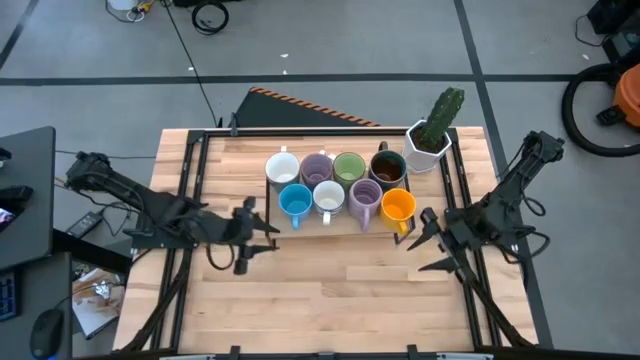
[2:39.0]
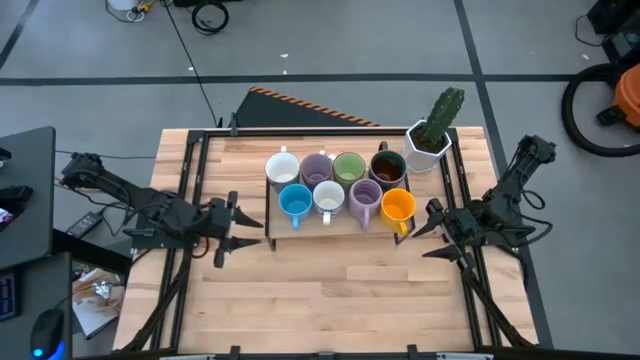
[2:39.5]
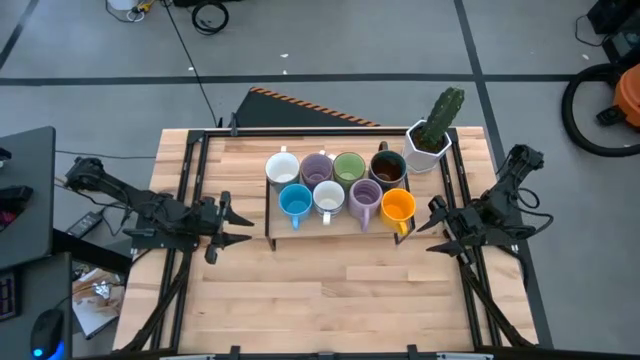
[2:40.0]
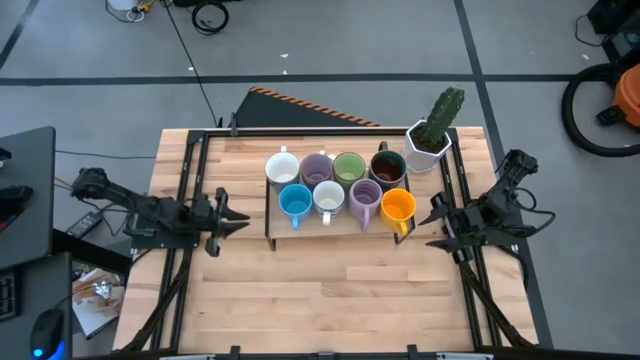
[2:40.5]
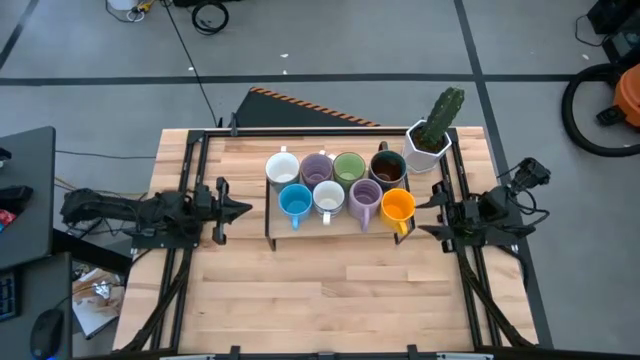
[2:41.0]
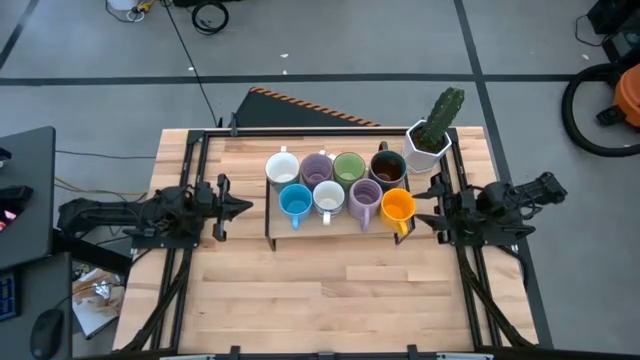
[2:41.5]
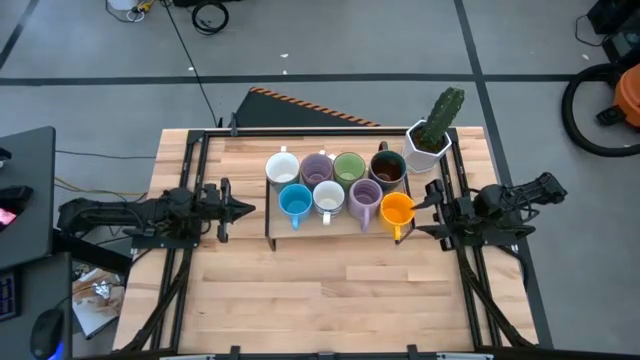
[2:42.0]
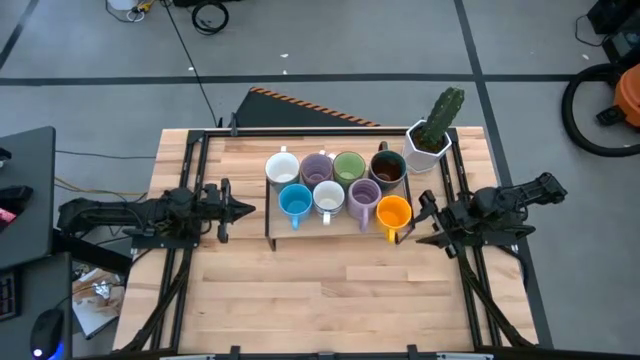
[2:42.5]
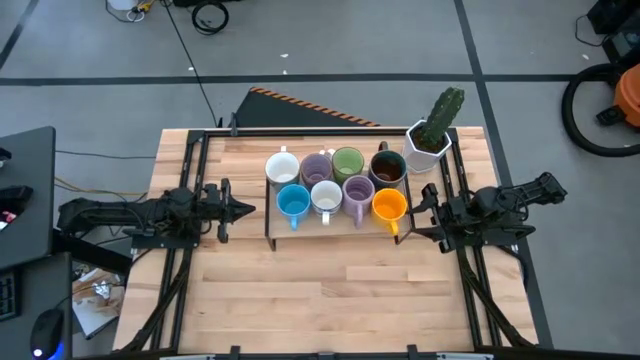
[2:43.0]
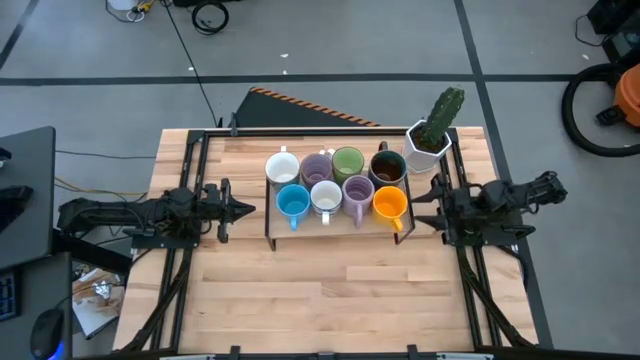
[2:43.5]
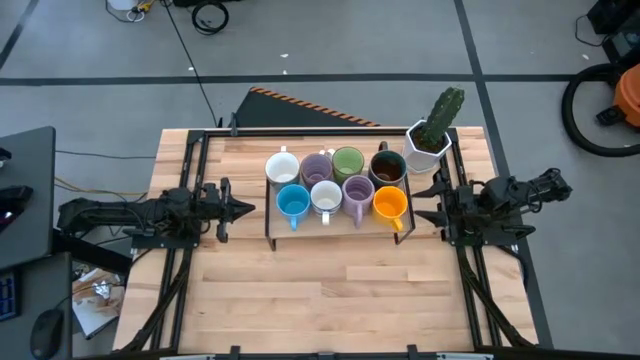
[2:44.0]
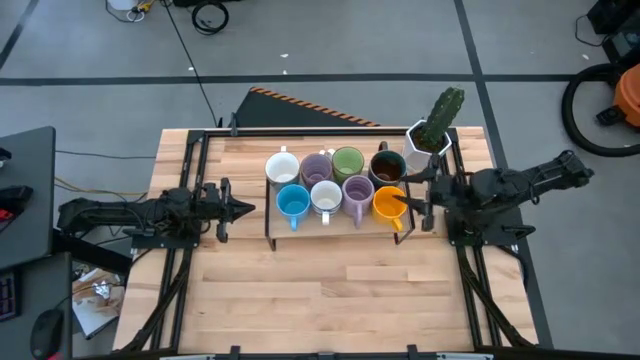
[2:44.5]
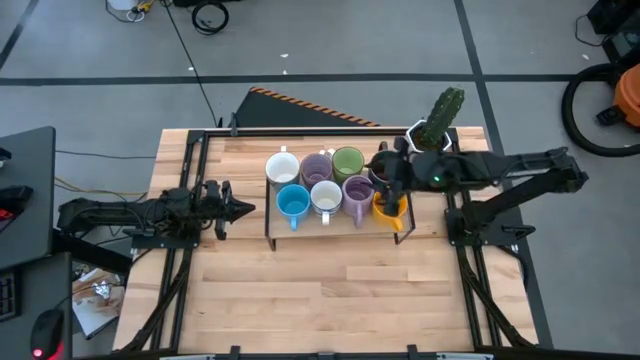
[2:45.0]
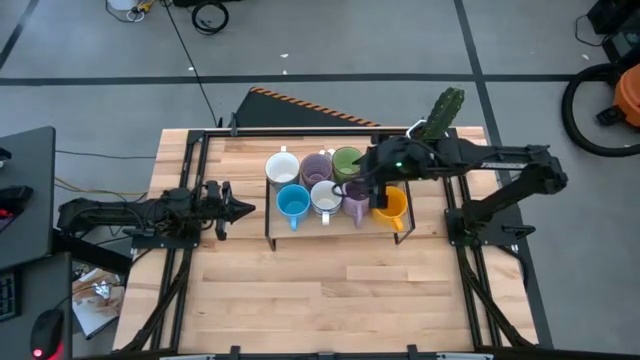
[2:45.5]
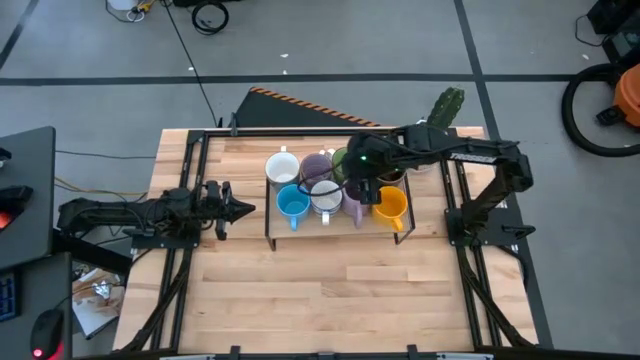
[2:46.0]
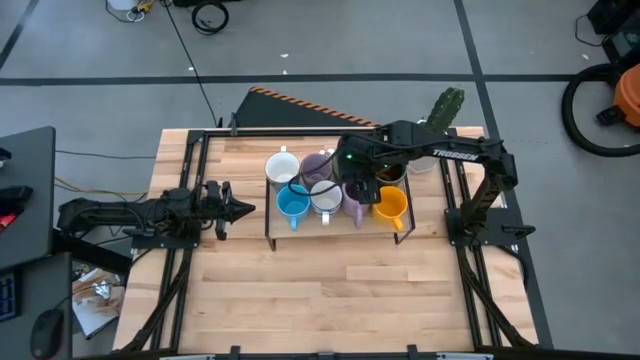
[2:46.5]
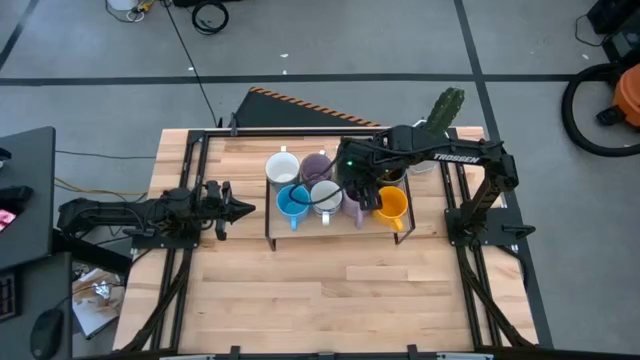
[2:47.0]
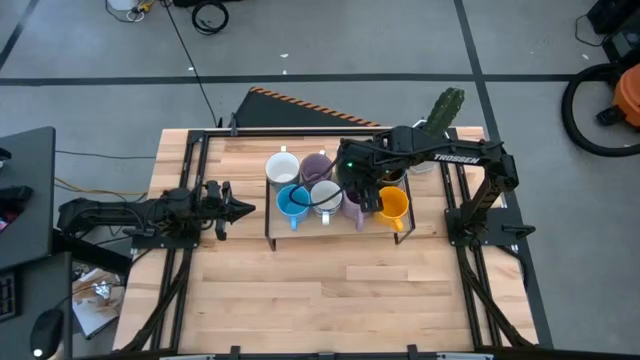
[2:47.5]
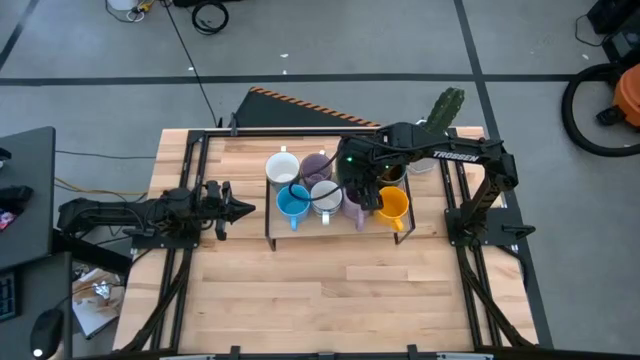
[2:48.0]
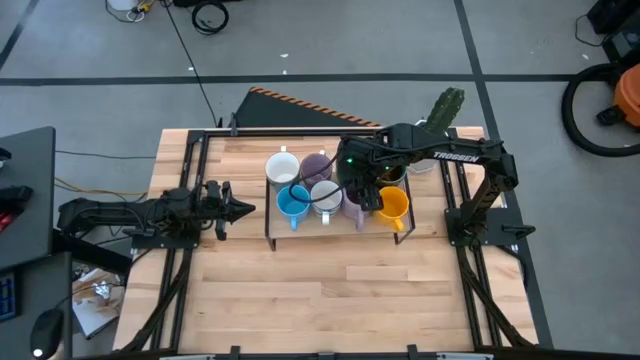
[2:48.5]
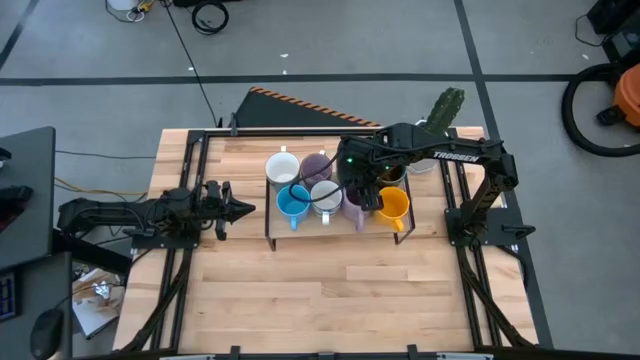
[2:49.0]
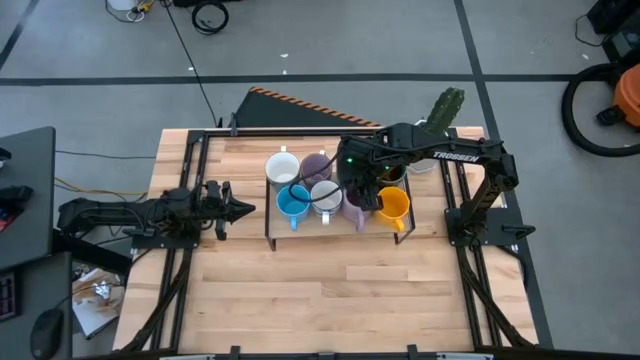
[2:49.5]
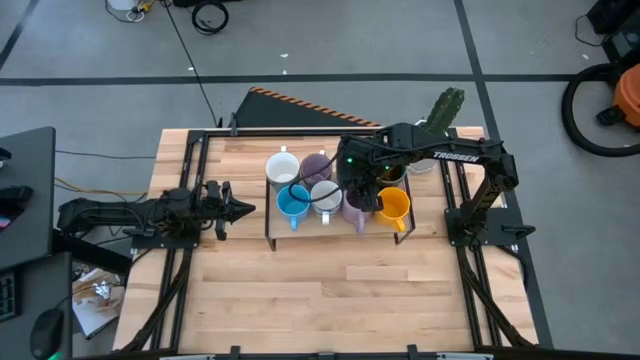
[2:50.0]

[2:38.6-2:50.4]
Task: Place coffee mugs
Adjust the green mug

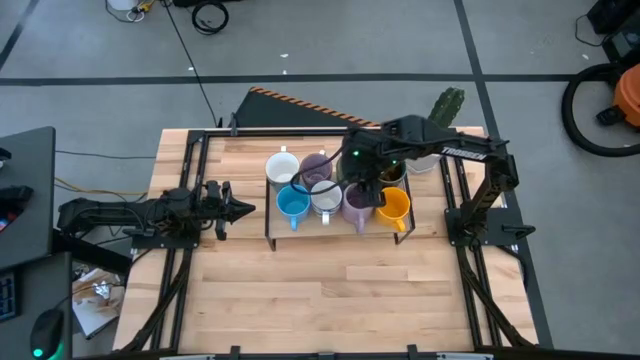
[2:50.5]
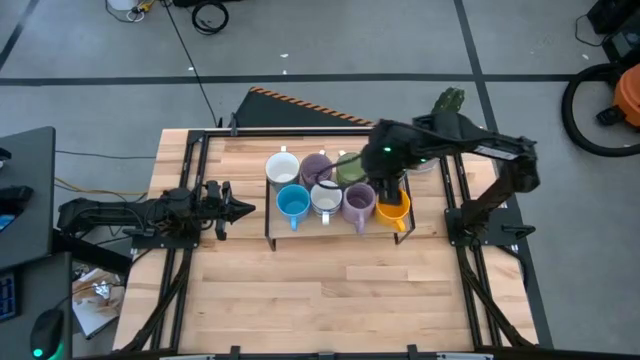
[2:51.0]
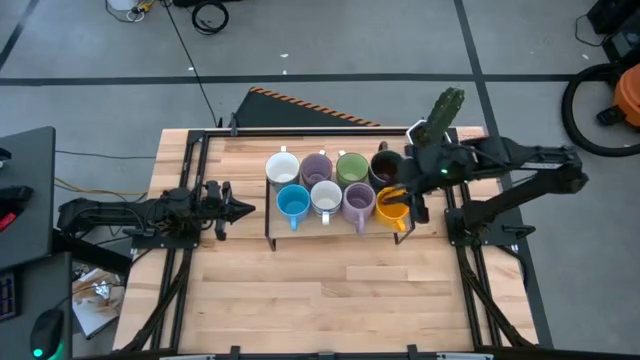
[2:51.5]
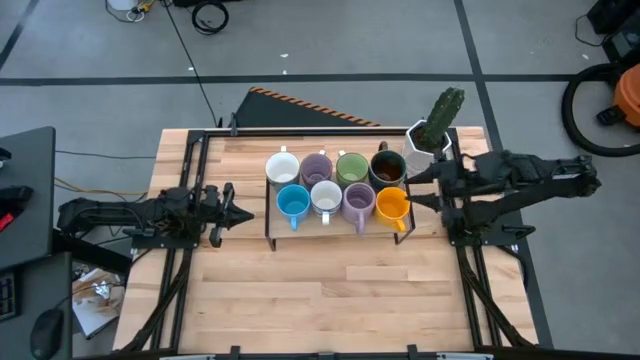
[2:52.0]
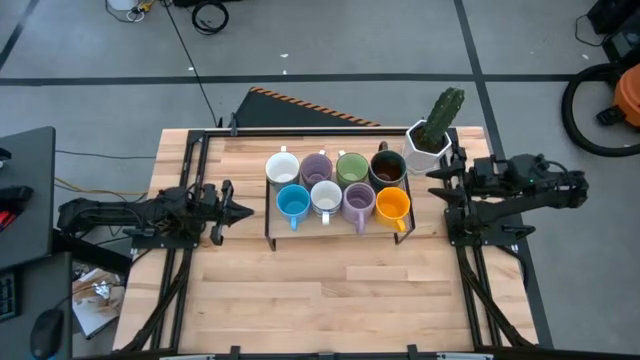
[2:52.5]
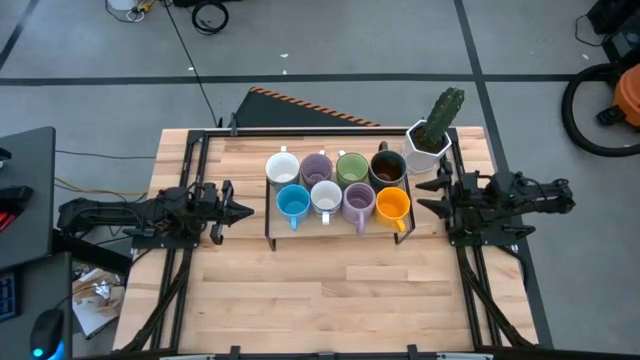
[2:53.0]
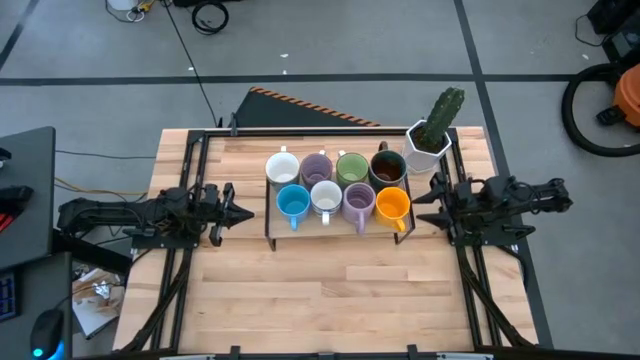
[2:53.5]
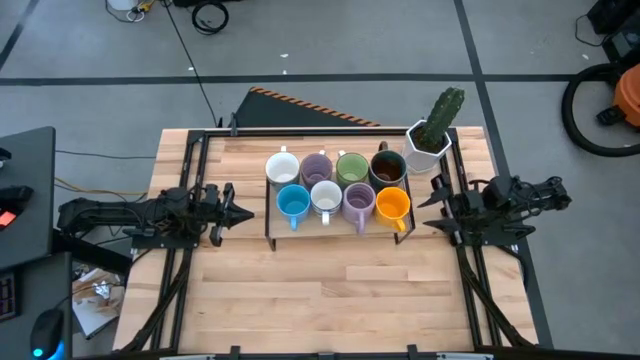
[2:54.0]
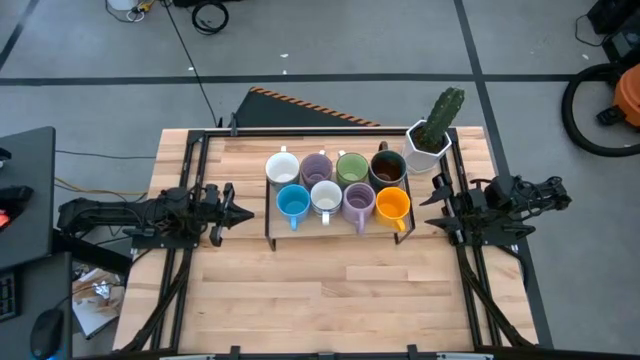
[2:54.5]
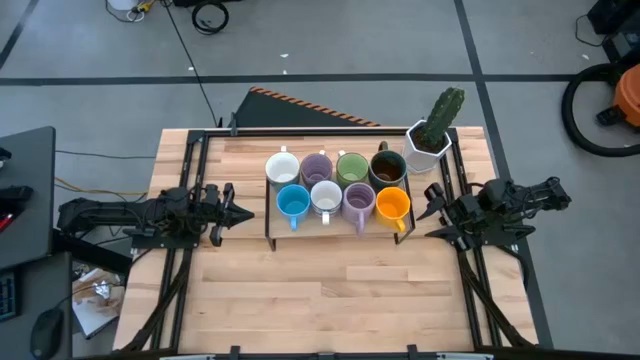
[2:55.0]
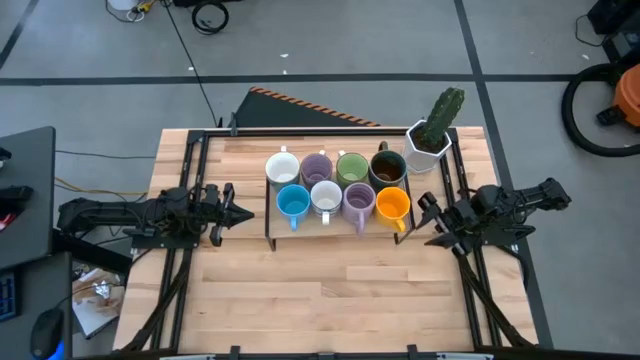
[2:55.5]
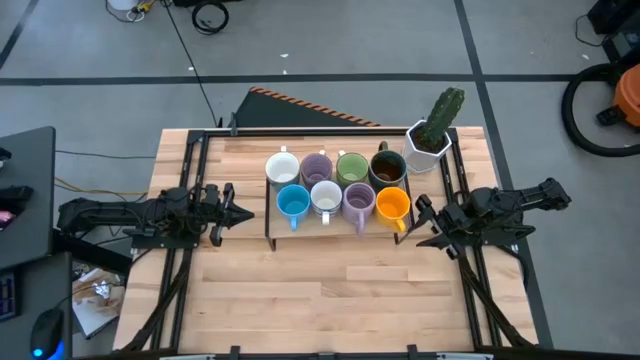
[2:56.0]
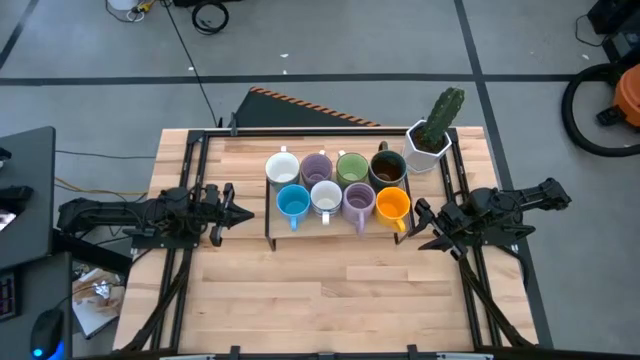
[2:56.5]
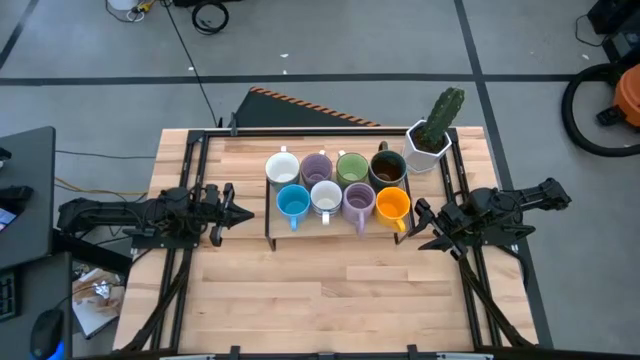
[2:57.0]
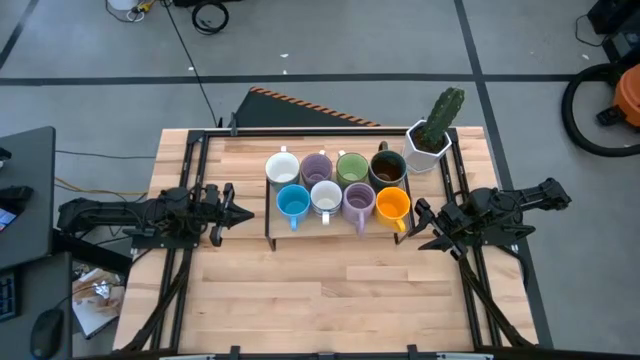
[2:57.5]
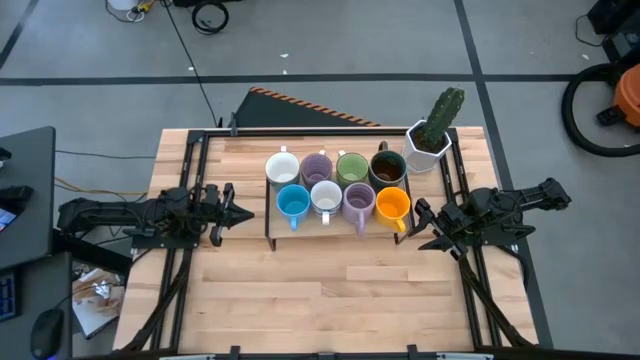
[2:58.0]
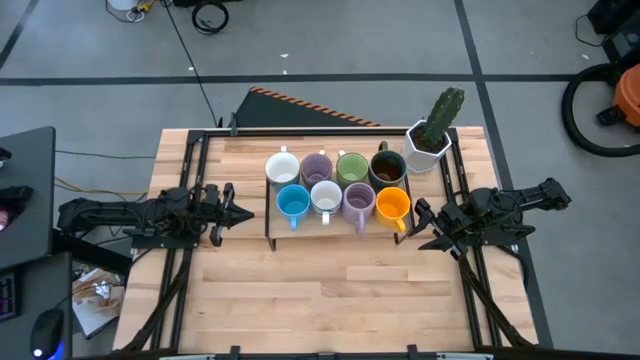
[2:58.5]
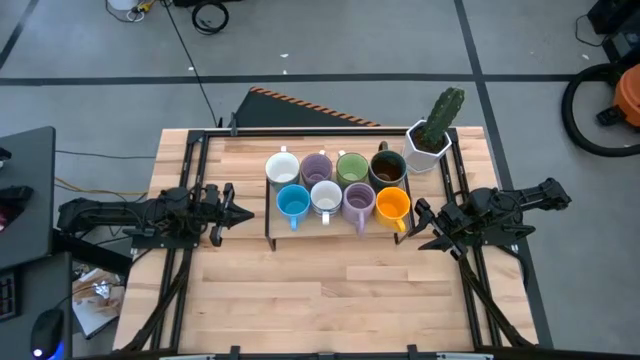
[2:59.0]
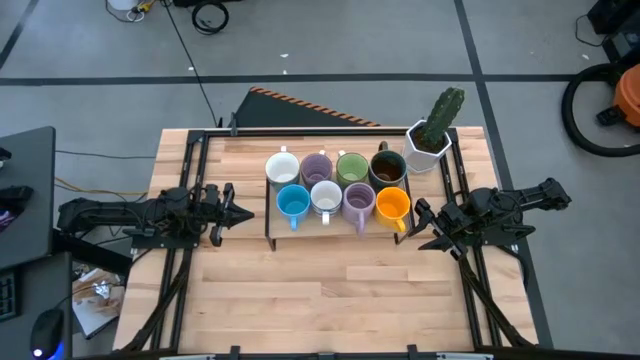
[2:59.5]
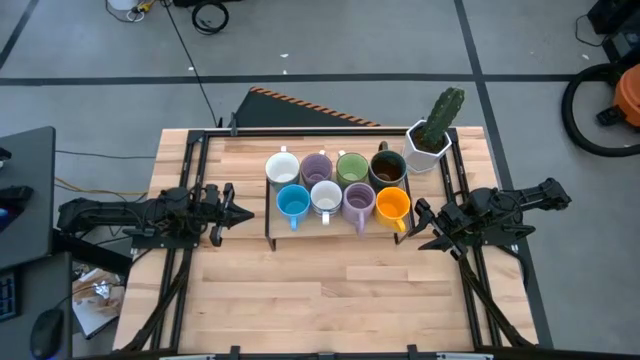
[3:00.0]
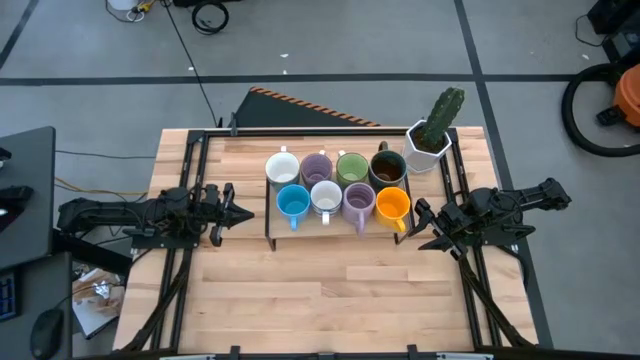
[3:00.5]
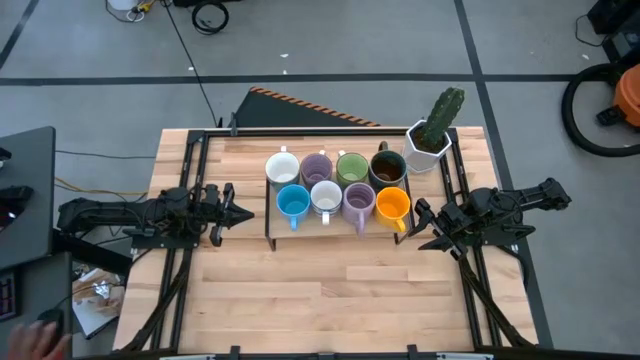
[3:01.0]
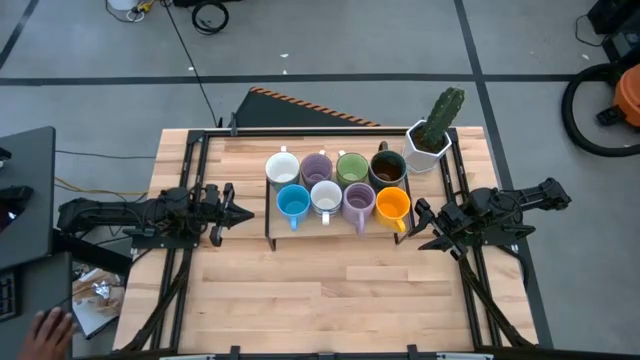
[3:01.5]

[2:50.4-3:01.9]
Return to Home Position
